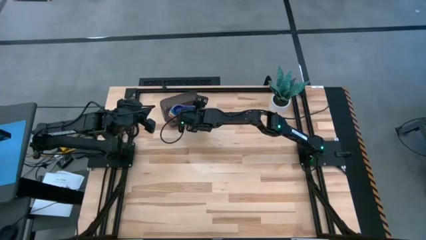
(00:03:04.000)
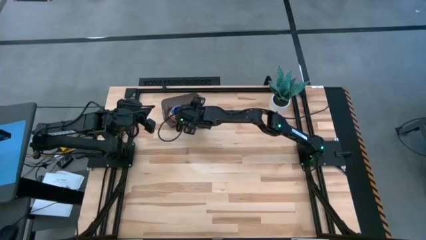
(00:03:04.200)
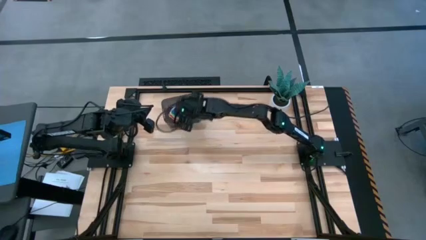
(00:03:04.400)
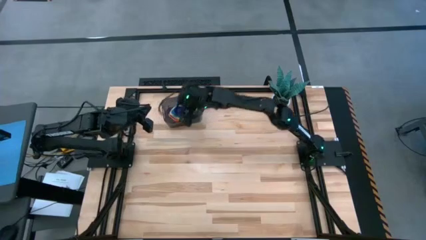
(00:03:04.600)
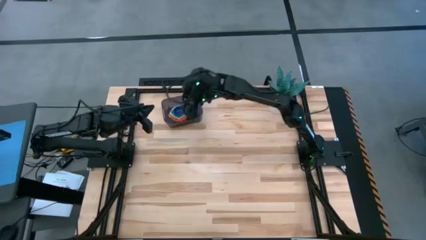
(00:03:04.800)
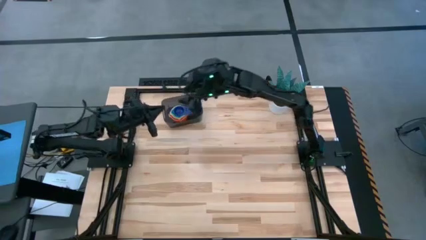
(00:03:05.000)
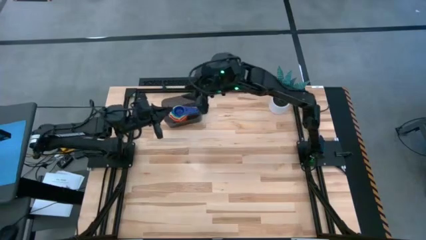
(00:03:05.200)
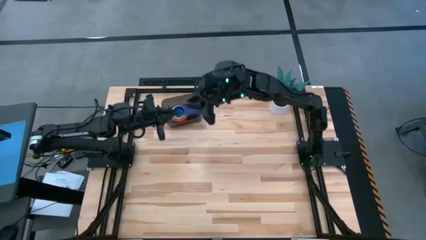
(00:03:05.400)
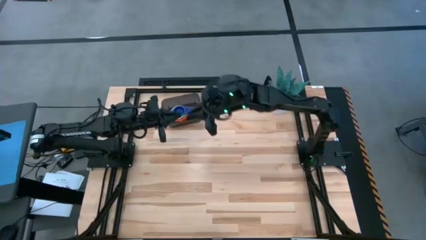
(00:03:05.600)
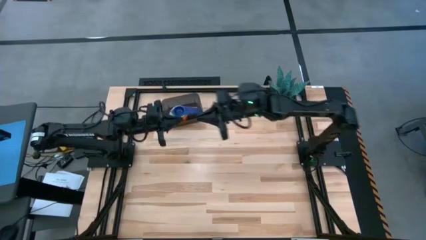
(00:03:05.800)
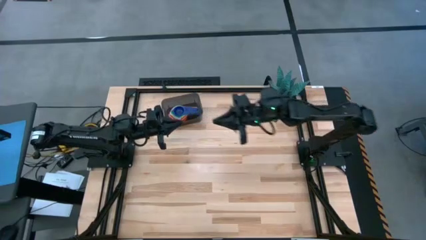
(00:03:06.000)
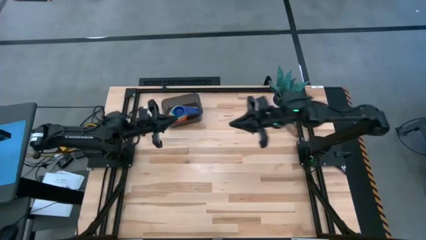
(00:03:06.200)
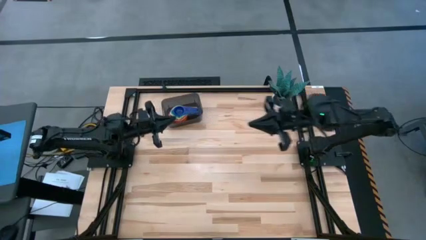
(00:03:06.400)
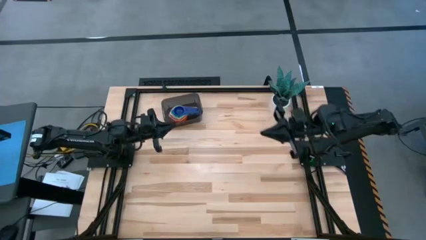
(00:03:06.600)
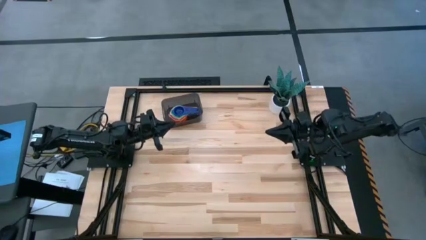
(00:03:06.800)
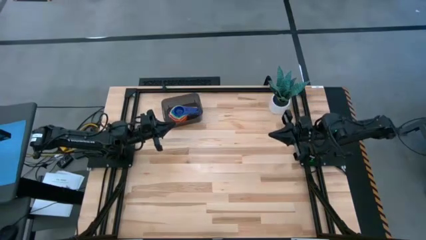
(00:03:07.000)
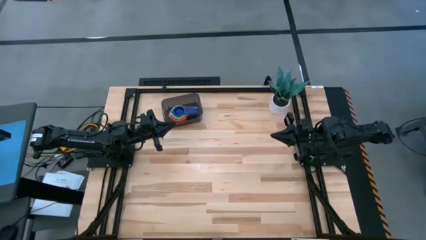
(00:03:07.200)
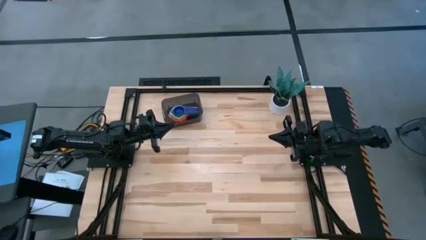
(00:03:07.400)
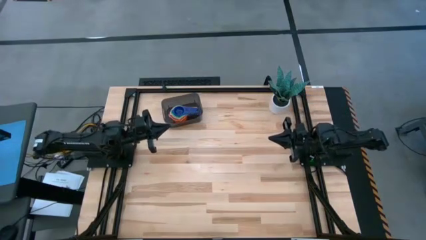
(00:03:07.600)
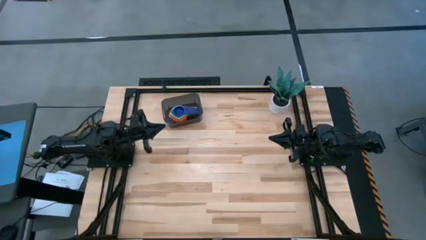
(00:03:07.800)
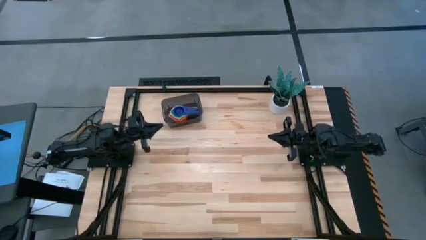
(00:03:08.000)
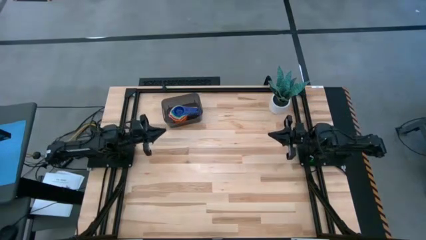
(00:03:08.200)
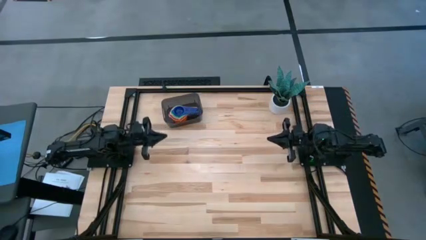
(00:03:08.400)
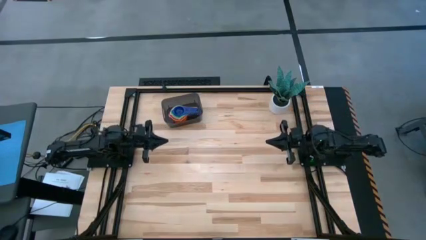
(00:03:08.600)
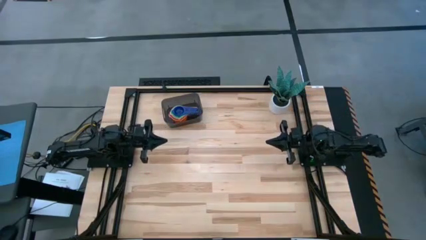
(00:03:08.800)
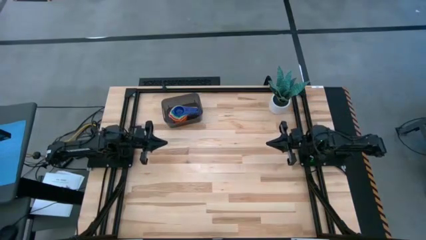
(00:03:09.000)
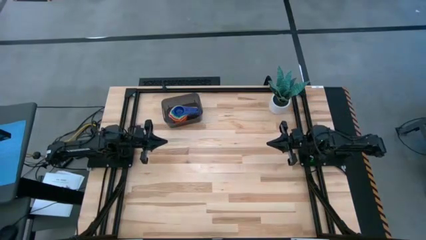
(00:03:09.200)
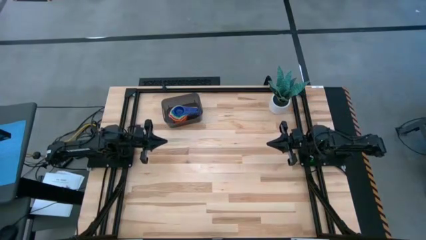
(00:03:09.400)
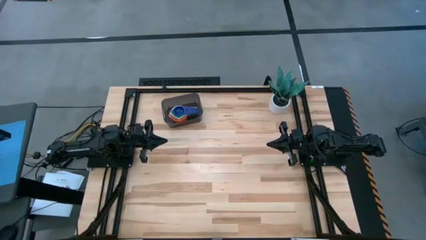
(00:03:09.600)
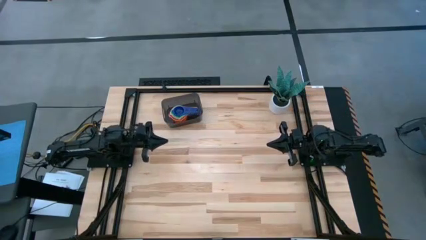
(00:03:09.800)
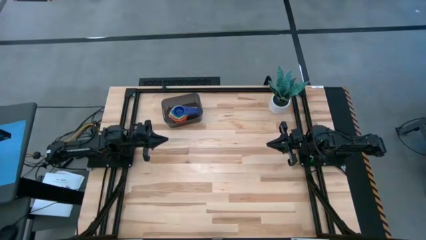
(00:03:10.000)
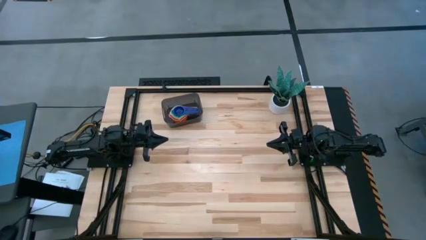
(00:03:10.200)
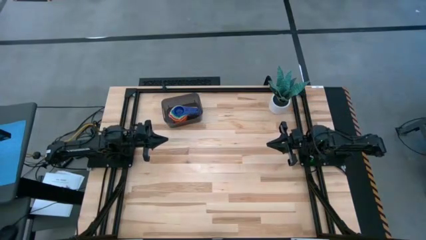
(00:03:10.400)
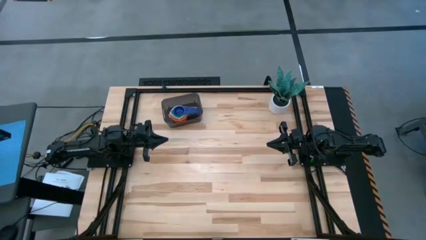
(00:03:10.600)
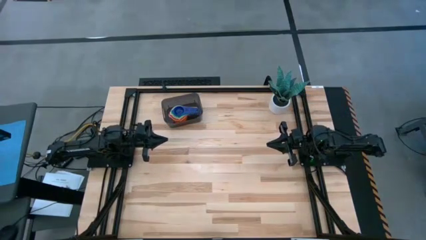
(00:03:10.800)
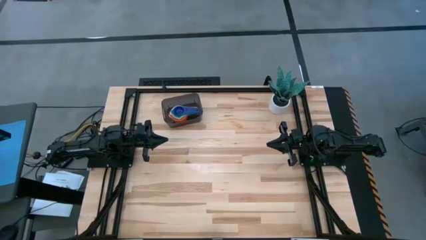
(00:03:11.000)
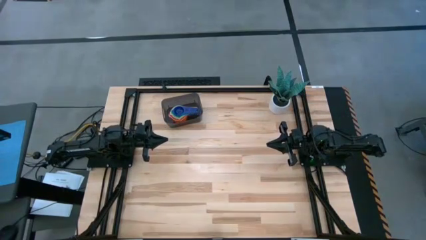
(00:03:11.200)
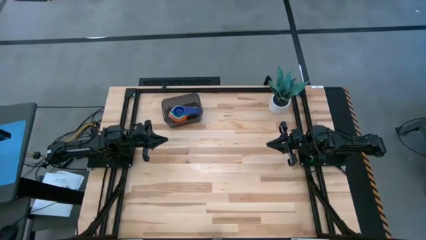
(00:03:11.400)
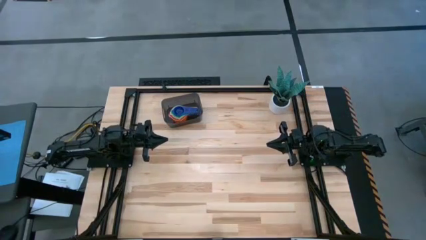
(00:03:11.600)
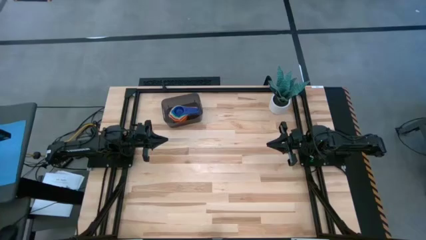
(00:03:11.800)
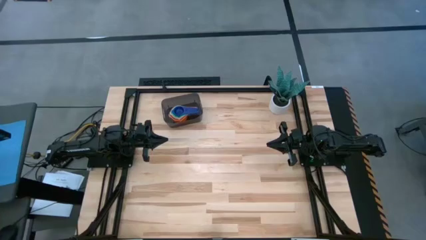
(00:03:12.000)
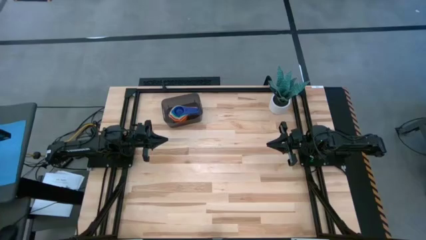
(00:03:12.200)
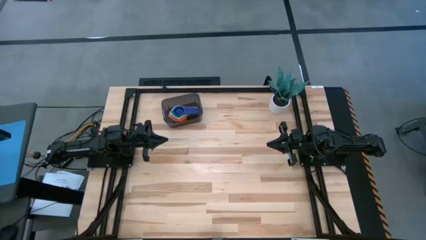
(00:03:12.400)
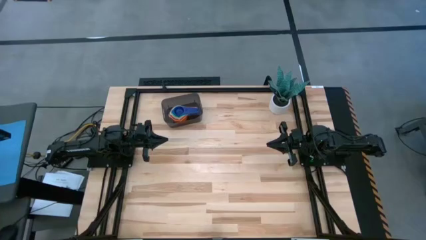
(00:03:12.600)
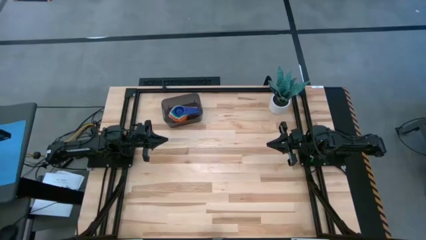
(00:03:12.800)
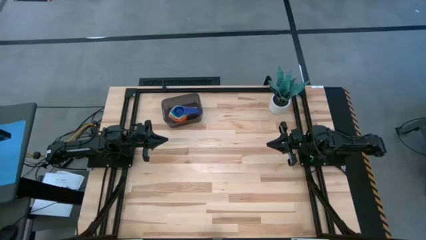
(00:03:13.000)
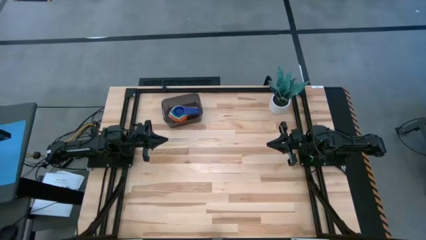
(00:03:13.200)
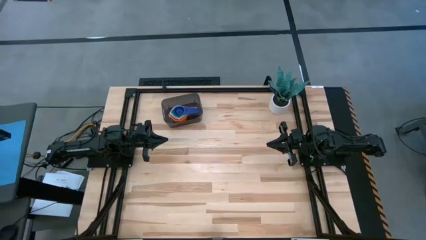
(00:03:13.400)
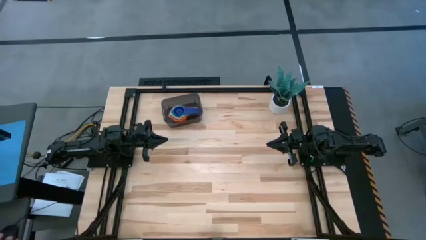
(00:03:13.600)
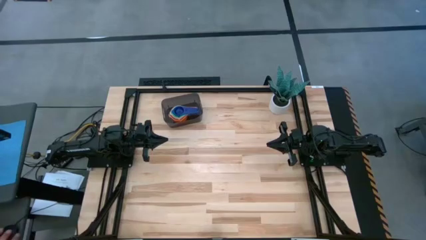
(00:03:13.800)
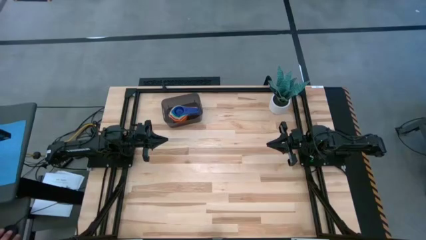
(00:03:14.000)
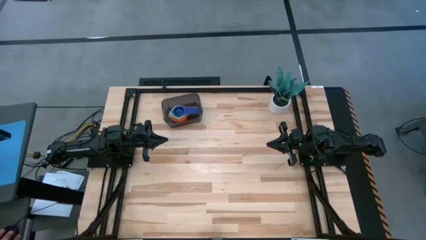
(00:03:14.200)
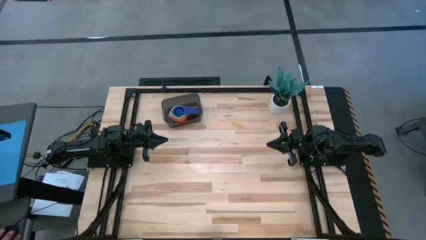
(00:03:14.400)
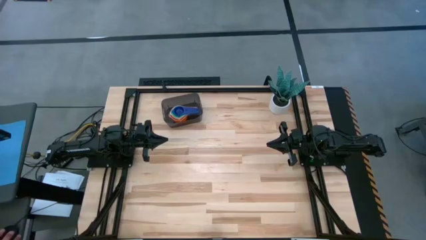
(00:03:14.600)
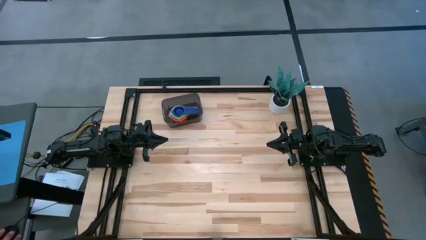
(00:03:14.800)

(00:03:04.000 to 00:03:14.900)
Task: Nest measuring cups in basket
Return To Home Position
